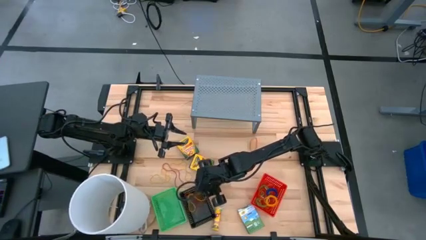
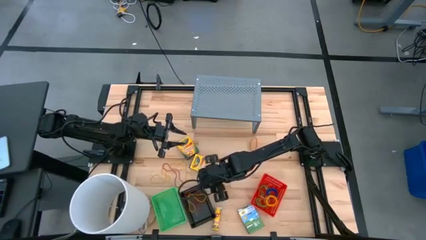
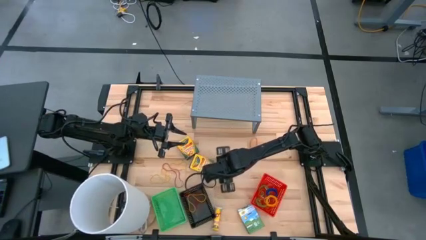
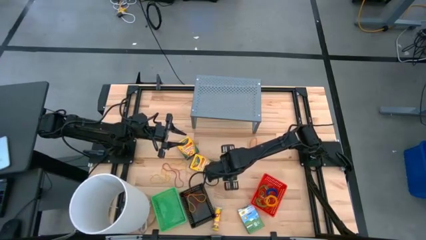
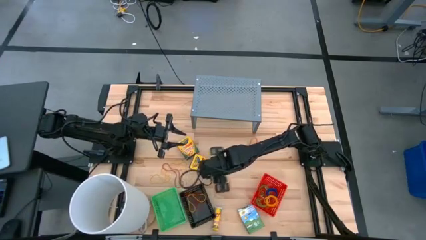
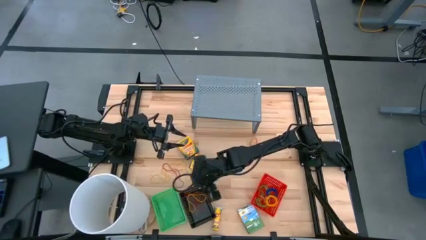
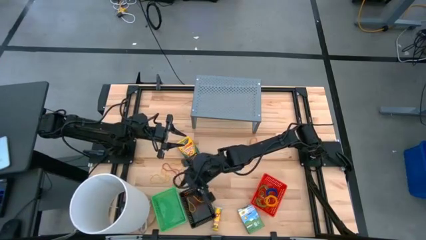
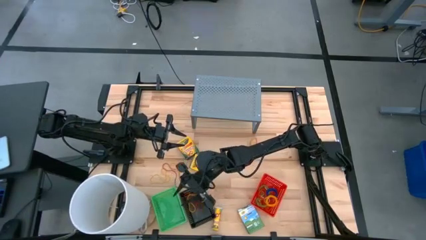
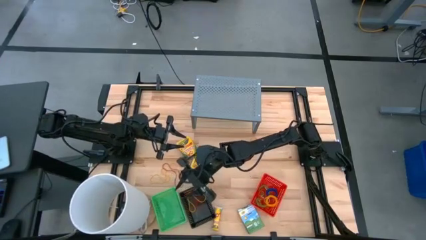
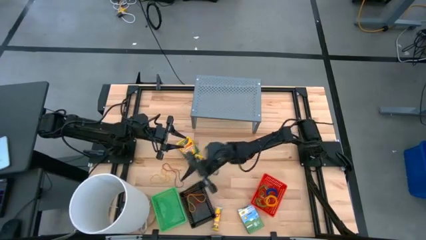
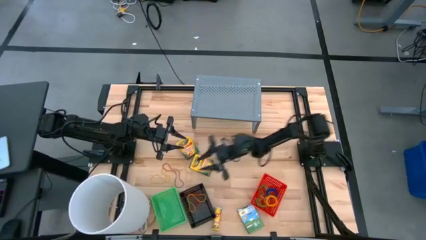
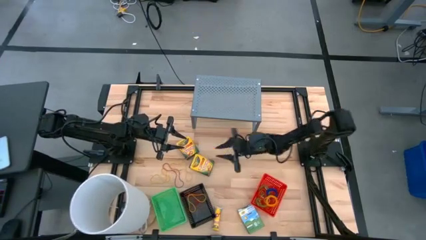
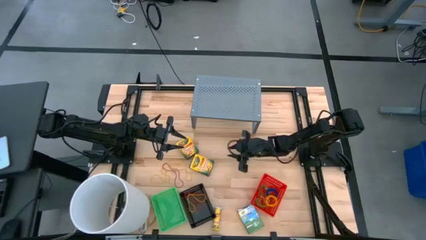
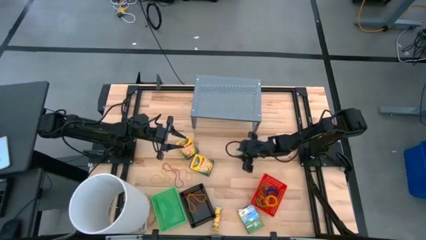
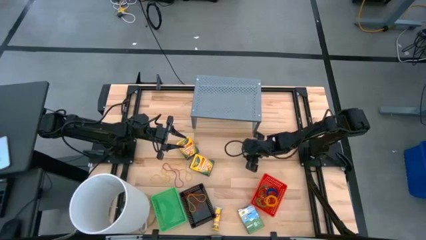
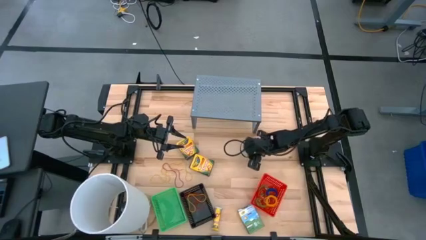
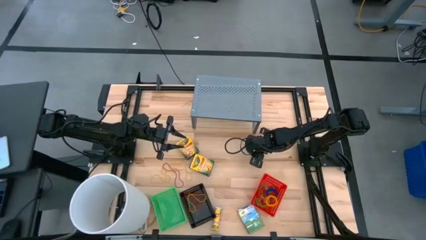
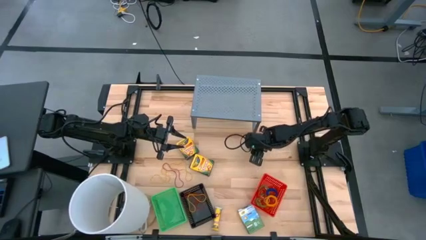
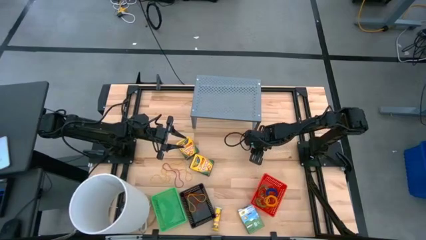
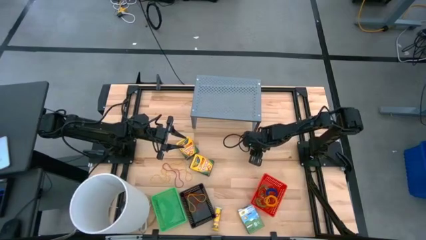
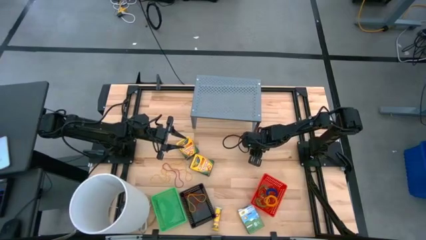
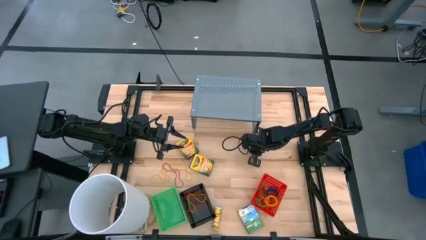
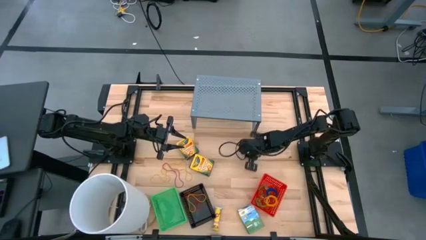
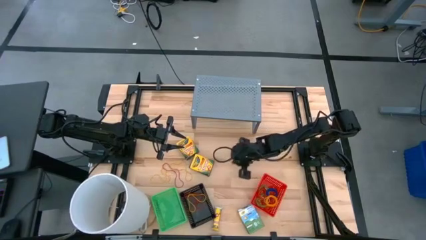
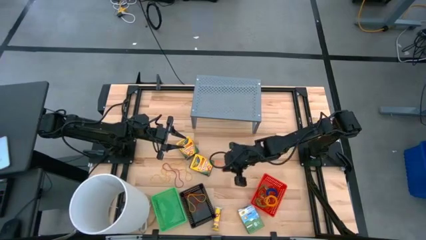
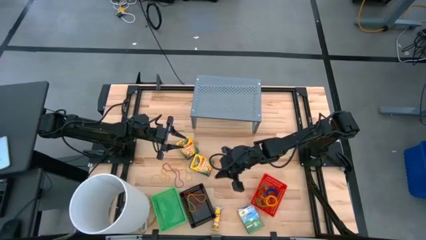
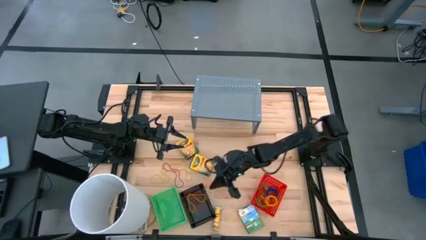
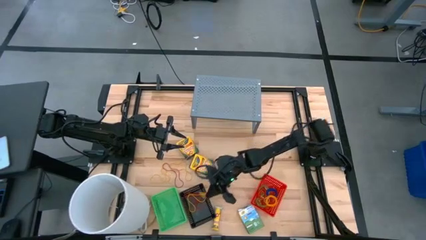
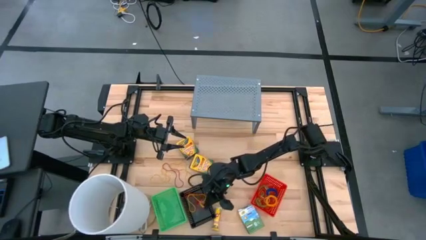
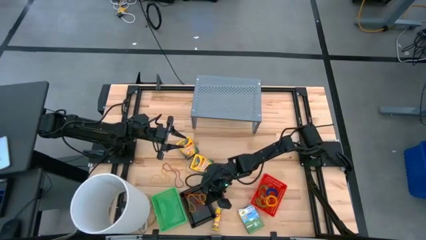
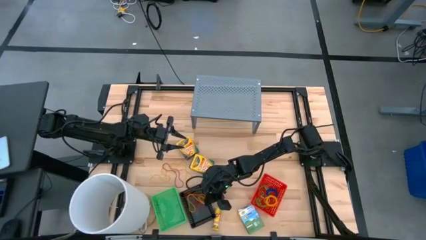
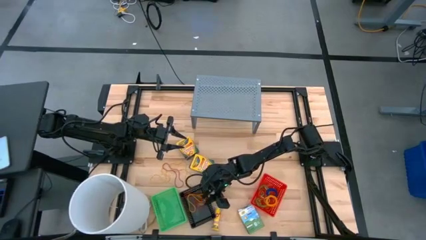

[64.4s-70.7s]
Task: Pick & Place Office Desk Supplies
Put the orange rubber band into the black bin

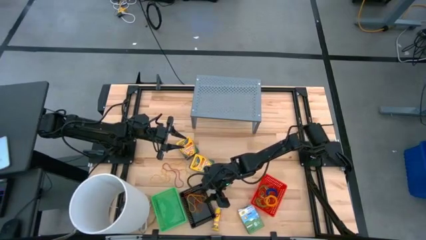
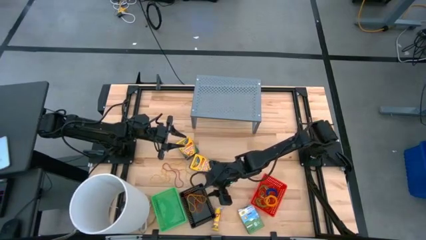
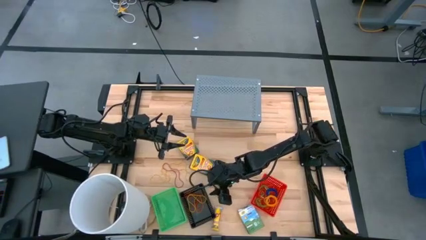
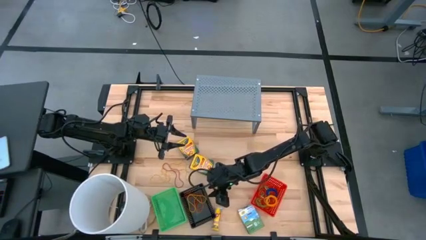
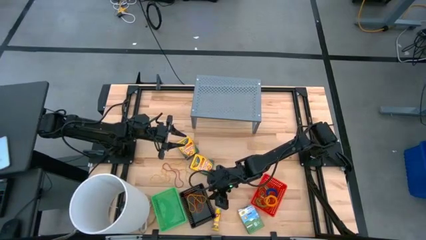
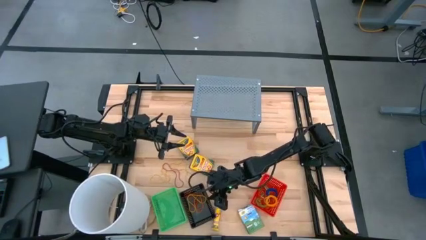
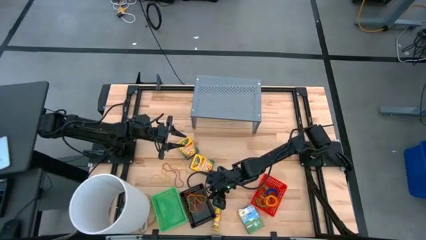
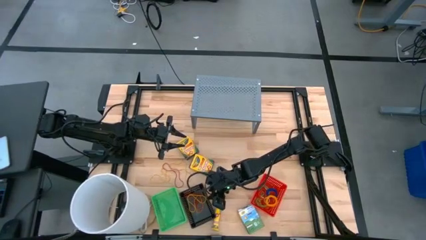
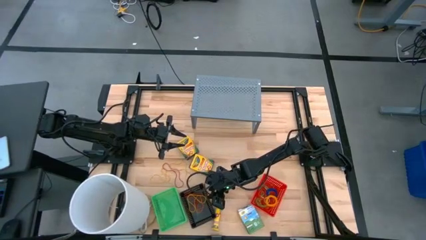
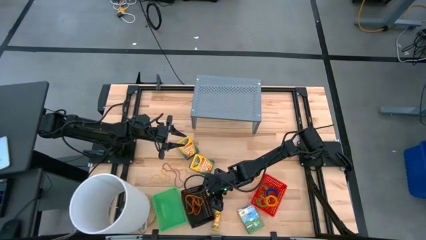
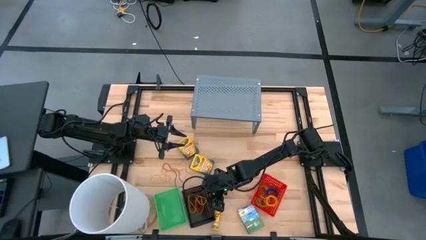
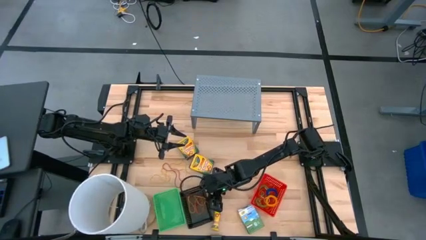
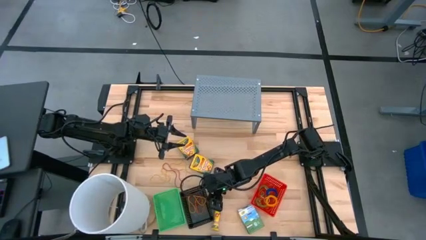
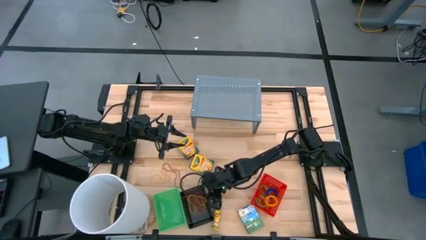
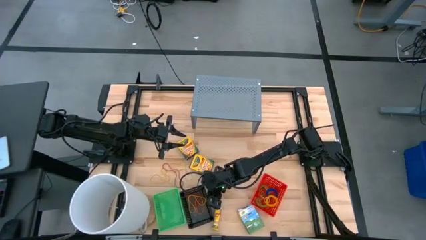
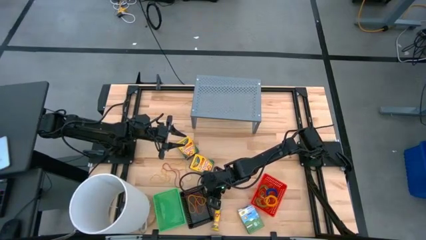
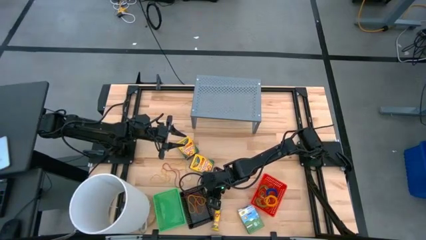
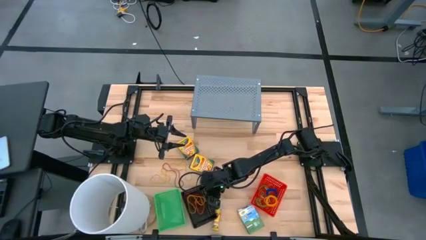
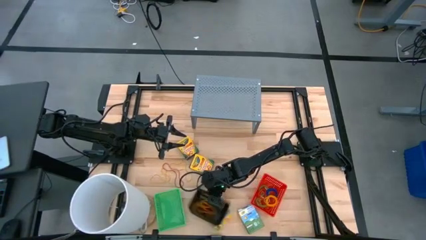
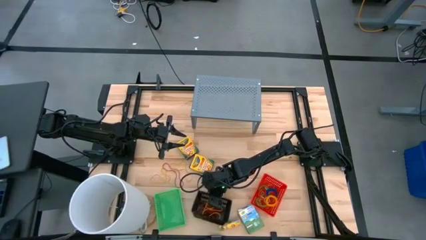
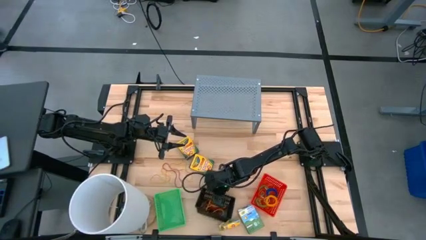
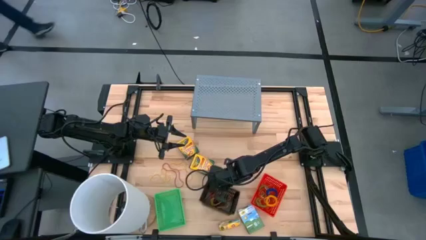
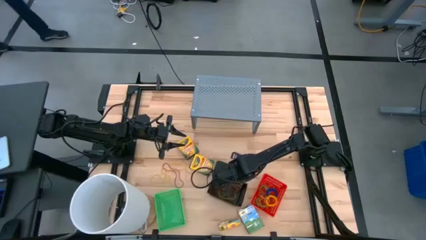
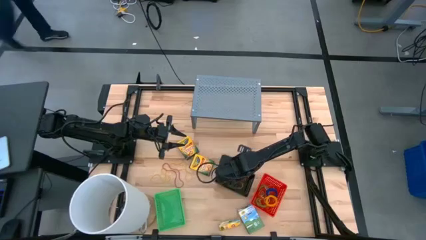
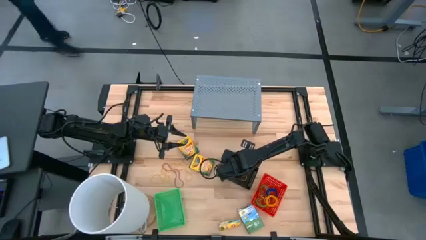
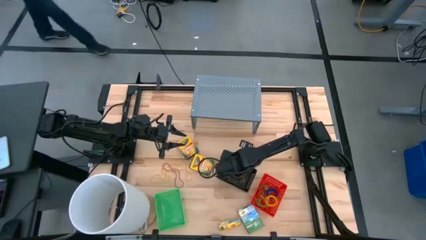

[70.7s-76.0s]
Adjust the black bin

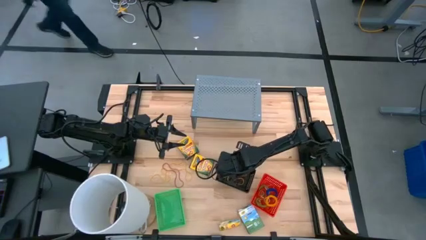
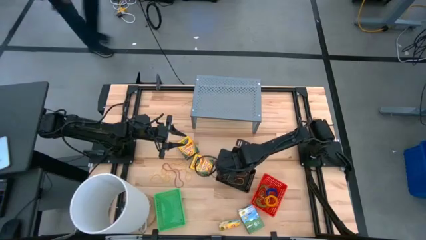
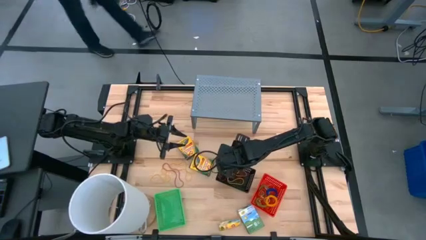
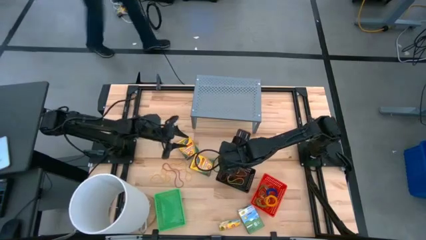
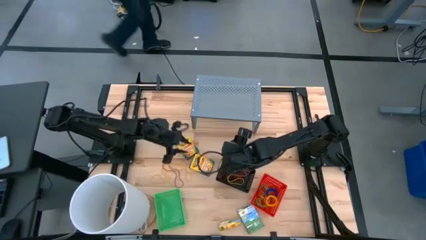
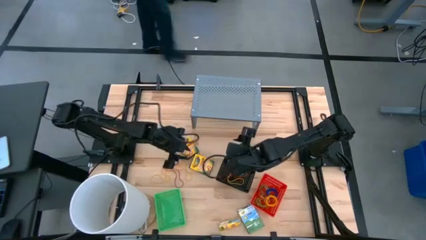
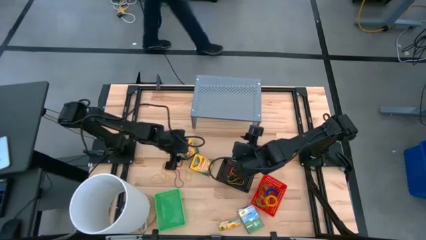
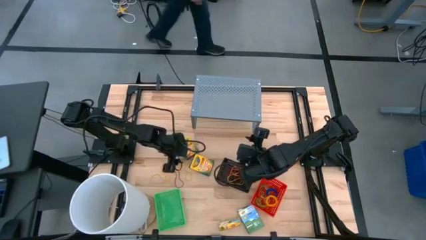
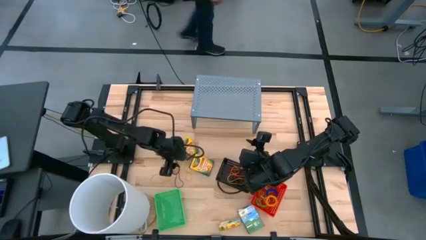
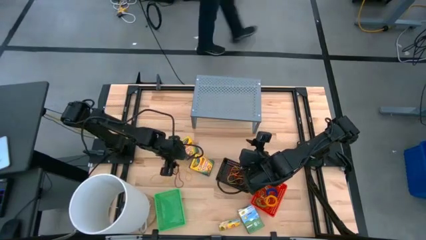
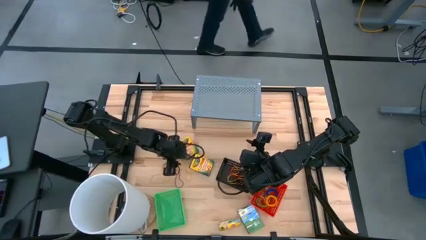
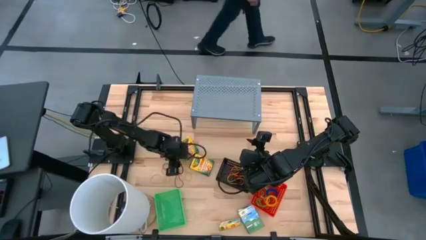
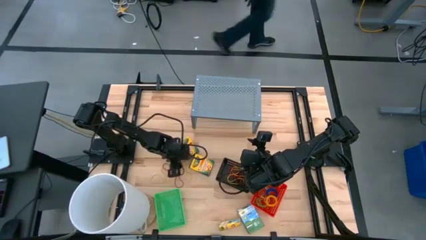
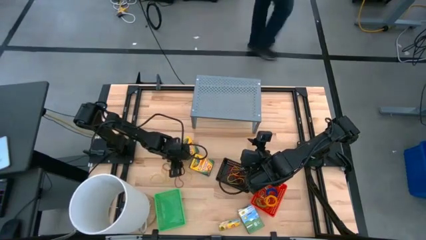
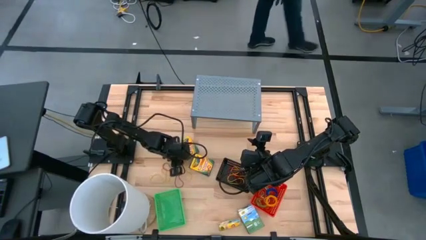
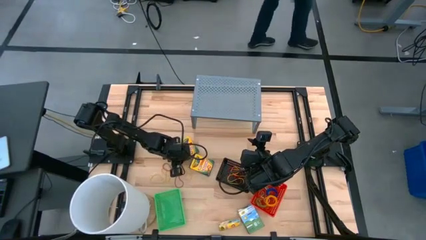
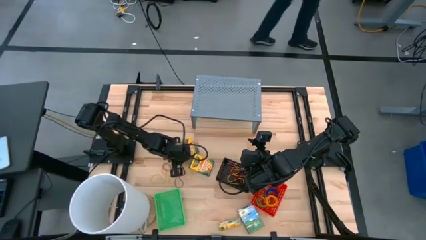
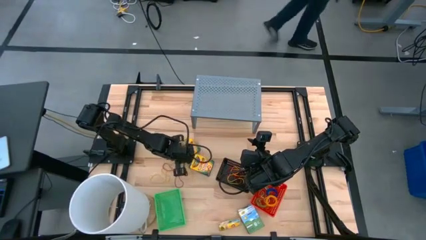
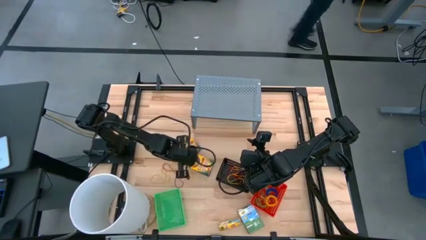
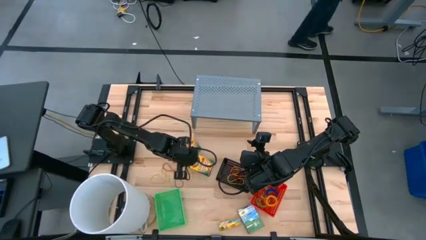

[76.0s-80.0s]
Put the yellow rubber band into the black bin
